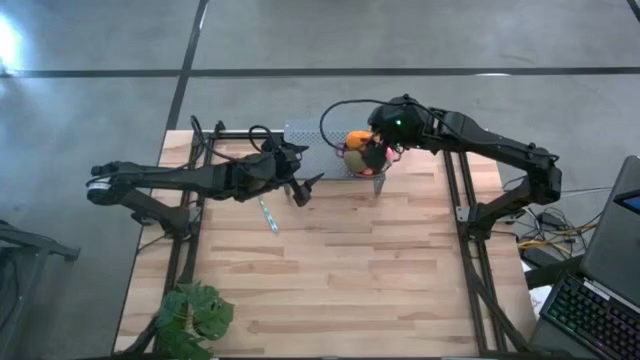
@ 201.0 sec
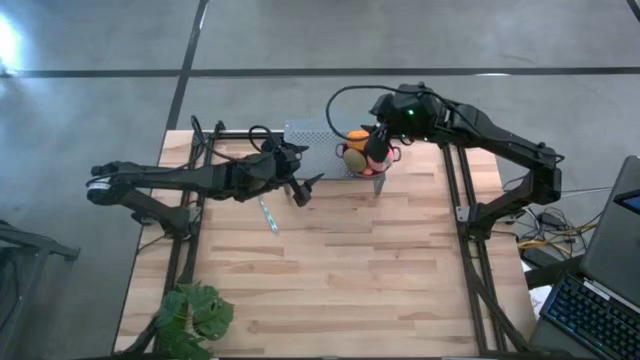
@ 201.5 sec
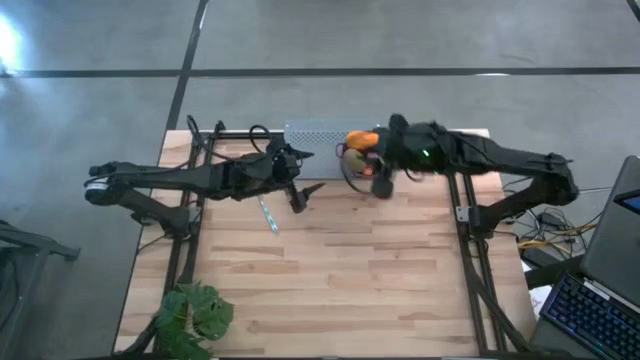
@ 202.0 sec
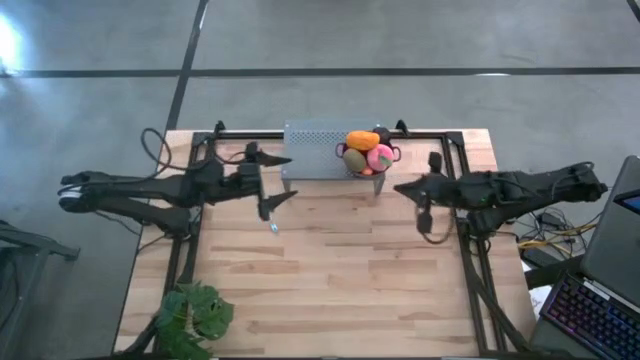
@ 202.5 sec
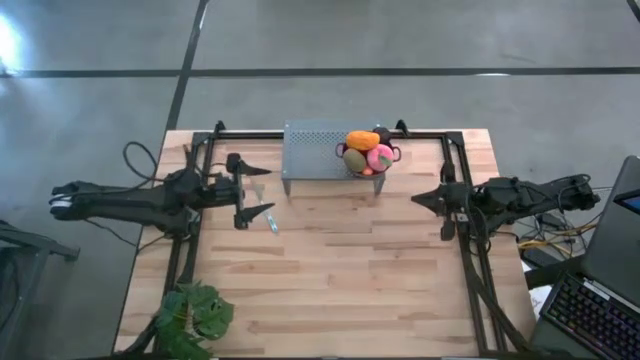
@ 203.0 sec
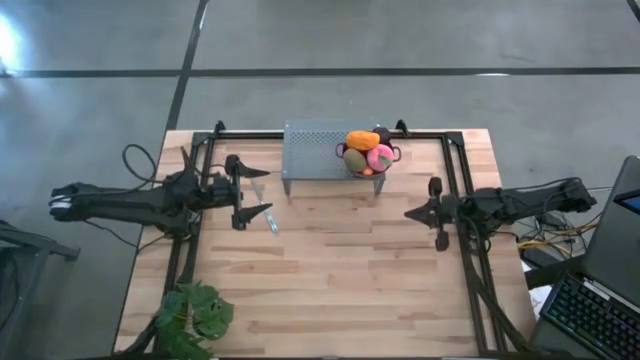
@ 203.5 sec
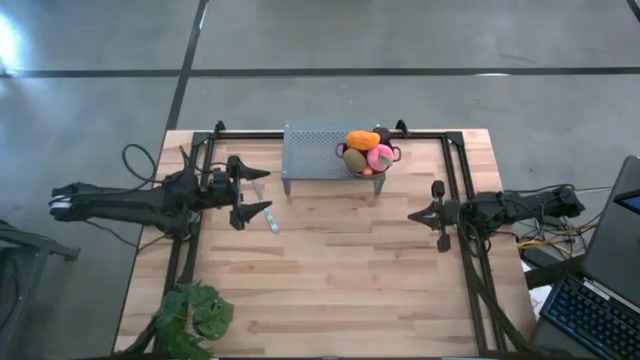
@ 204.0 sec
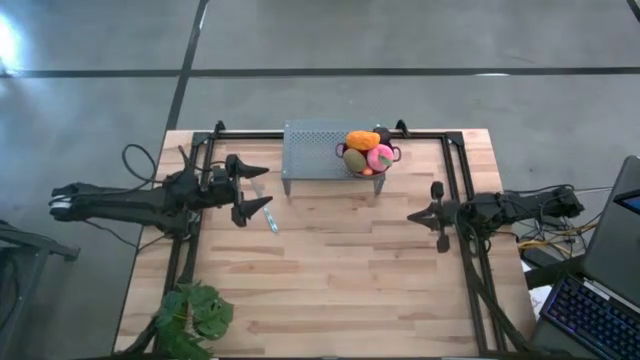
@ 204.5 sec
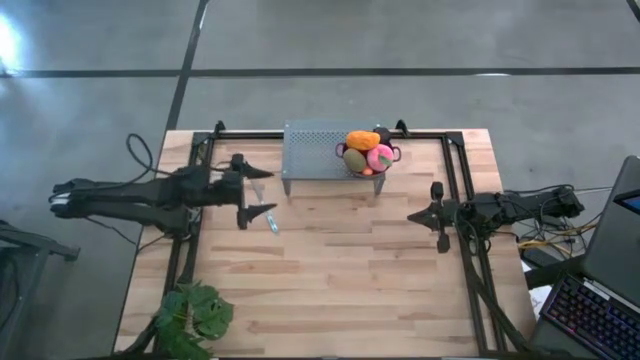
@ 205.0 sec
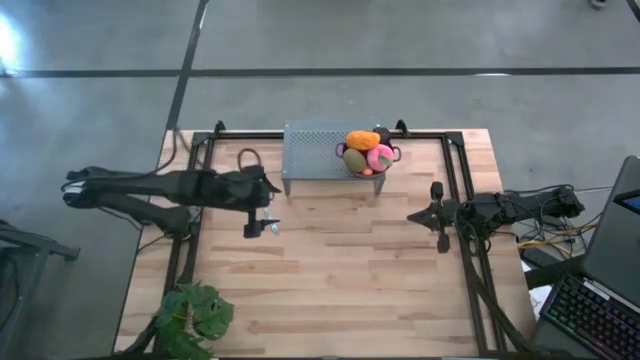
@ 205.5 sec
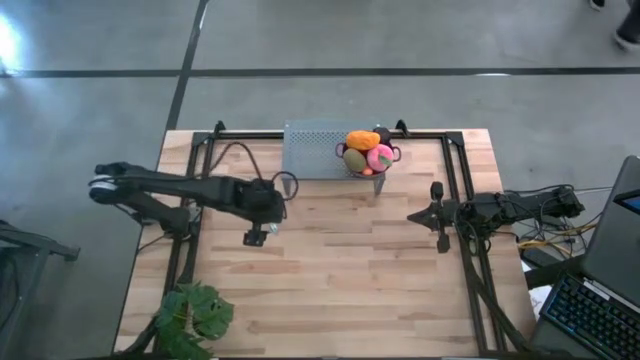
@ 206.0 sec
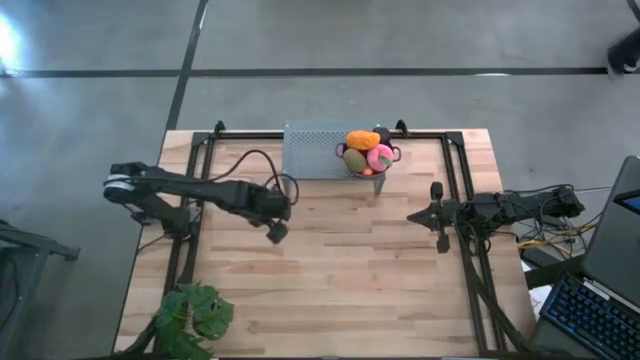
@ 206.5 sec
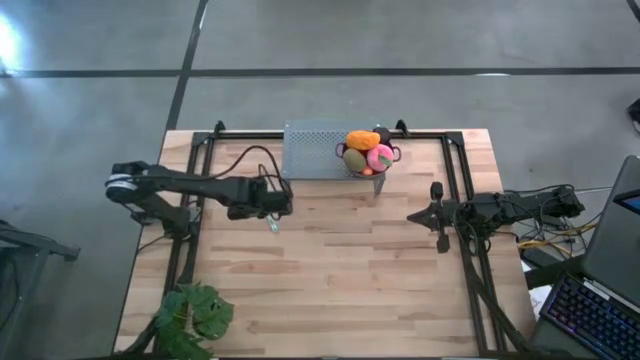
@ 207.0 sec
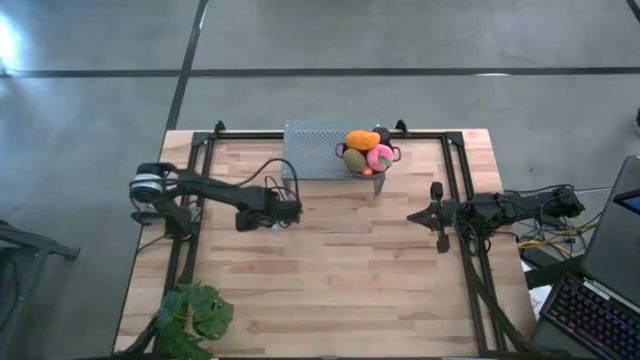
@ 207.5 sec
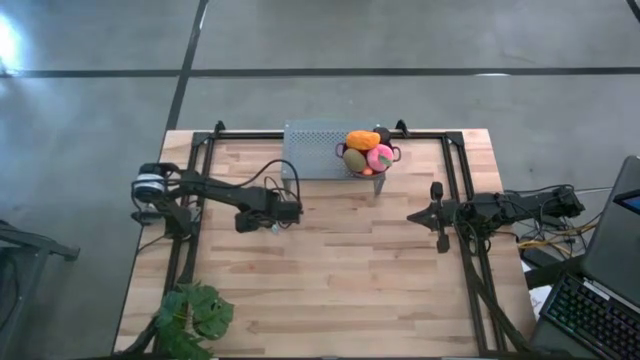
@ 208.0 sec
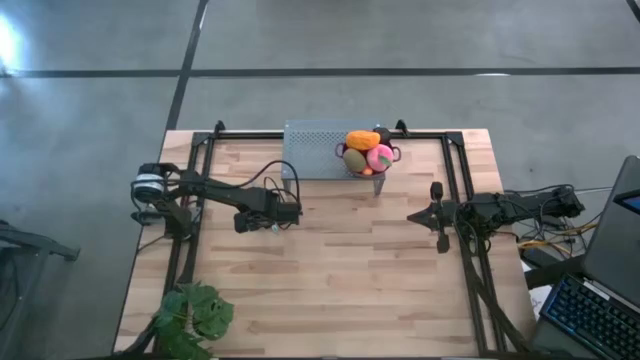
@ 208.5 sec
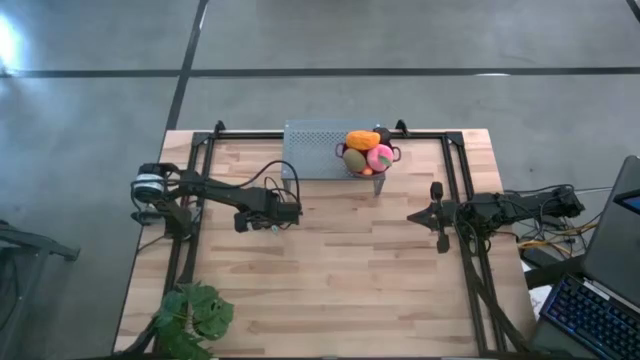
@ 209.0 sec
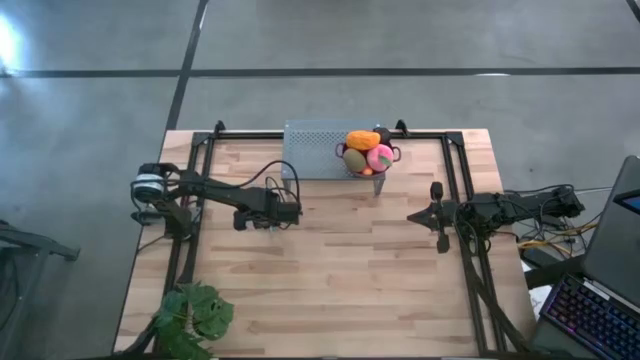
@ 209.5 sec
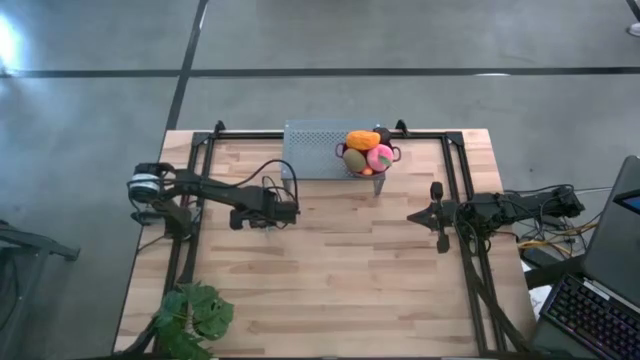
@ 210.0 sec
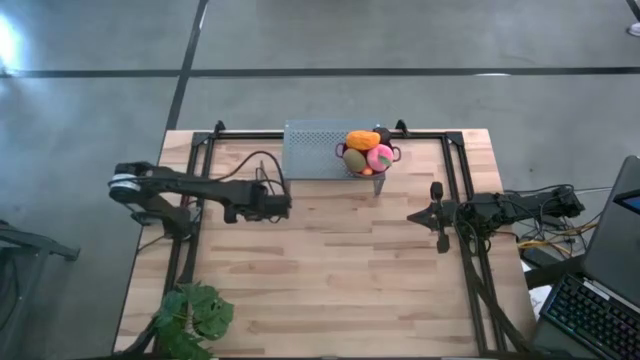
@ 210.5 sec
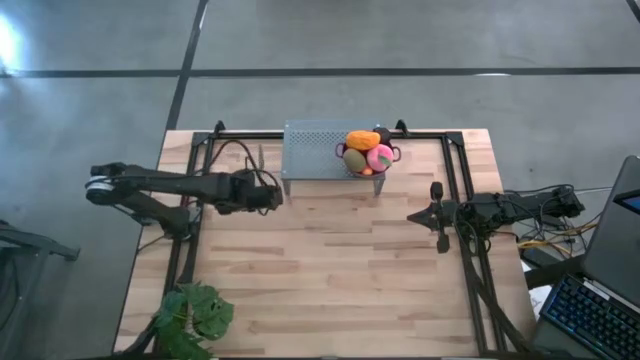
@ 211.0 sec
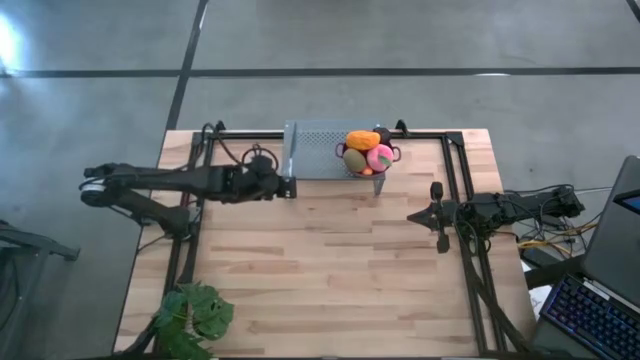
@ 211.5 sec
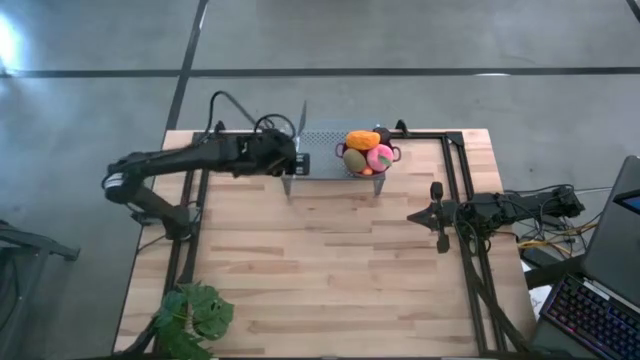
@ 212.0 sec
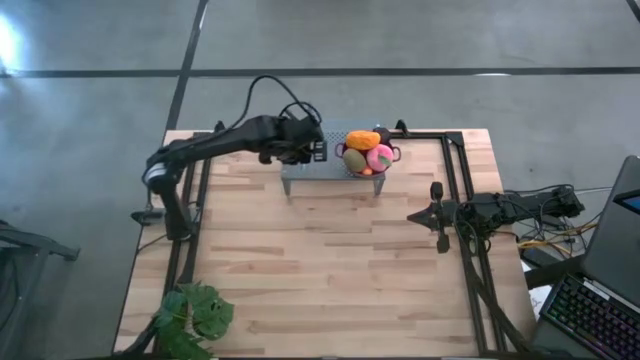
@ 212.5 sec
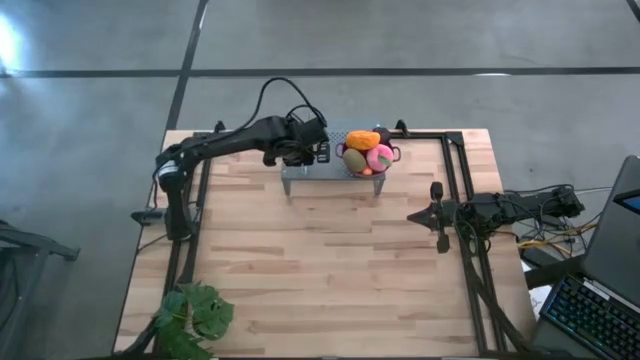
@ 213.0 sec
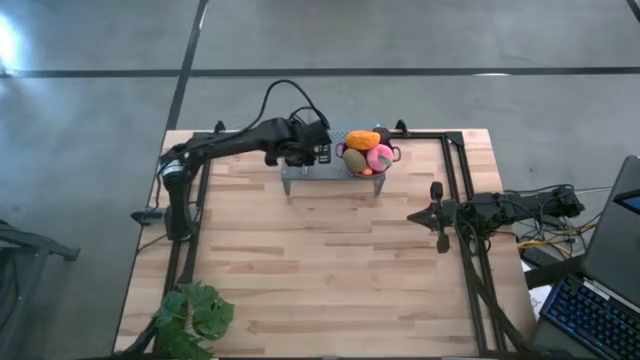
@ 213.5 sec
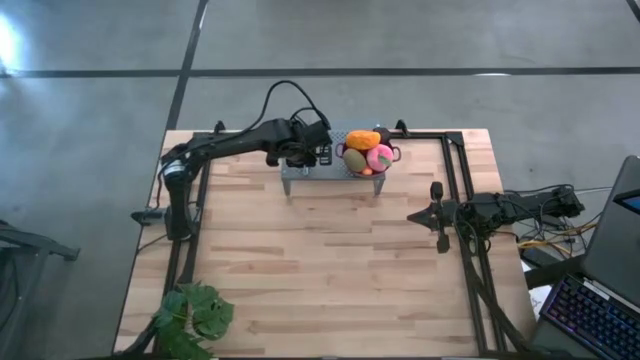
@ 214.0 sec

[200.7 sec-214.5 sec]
Task: Pick & Place Fruit
Put the knife on the shelf

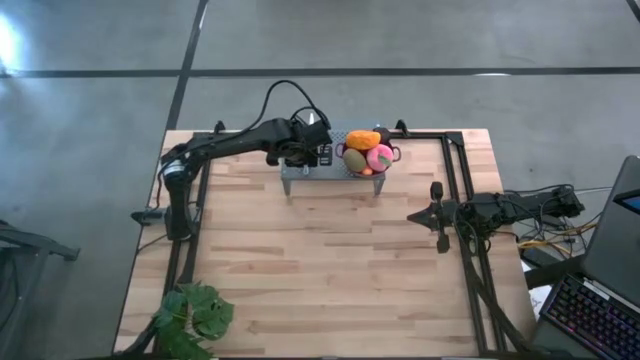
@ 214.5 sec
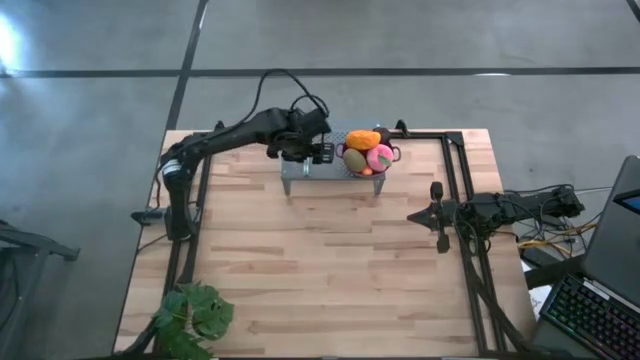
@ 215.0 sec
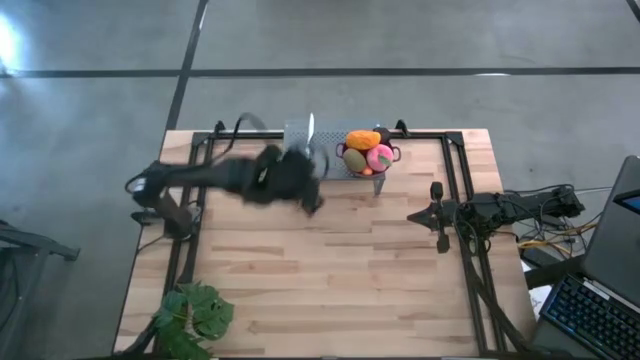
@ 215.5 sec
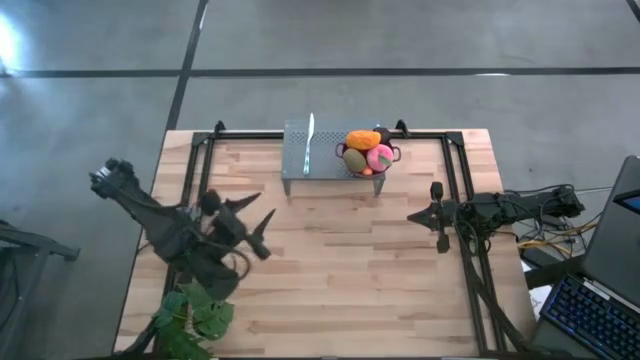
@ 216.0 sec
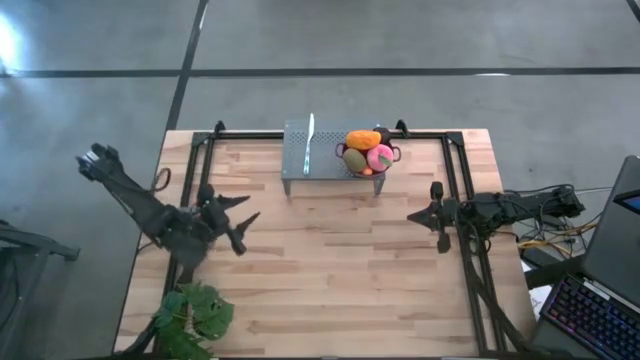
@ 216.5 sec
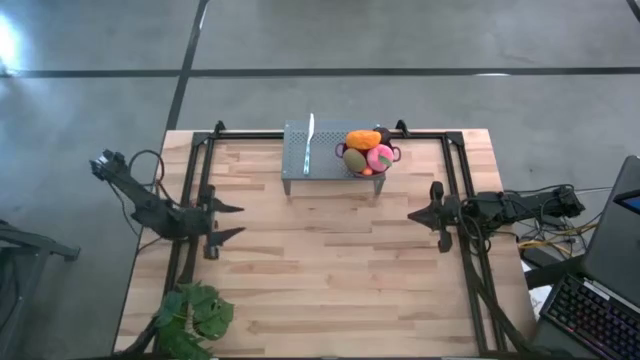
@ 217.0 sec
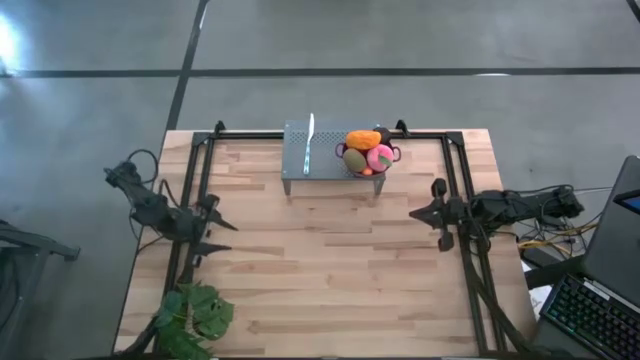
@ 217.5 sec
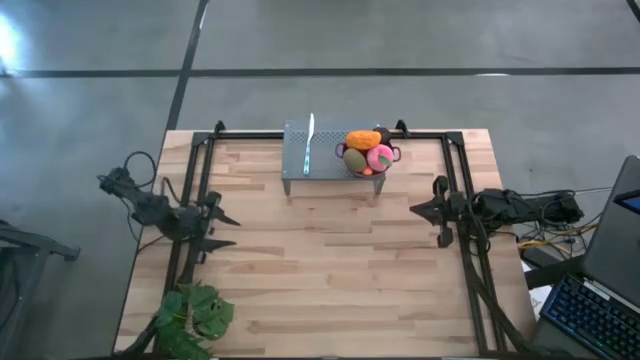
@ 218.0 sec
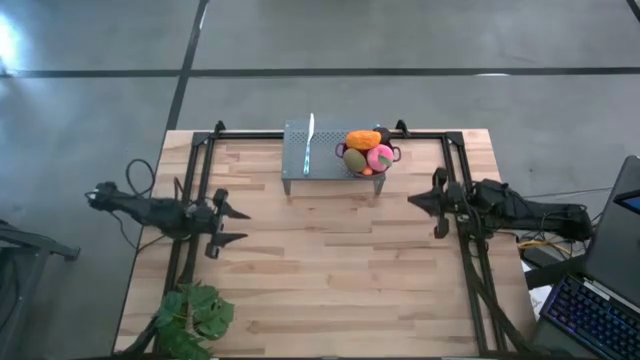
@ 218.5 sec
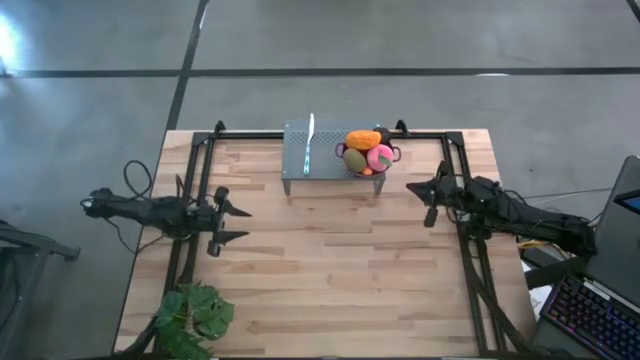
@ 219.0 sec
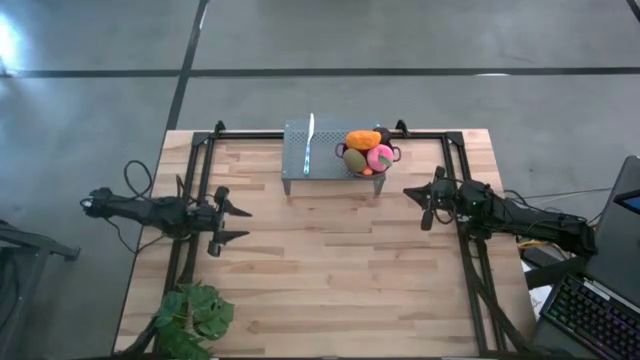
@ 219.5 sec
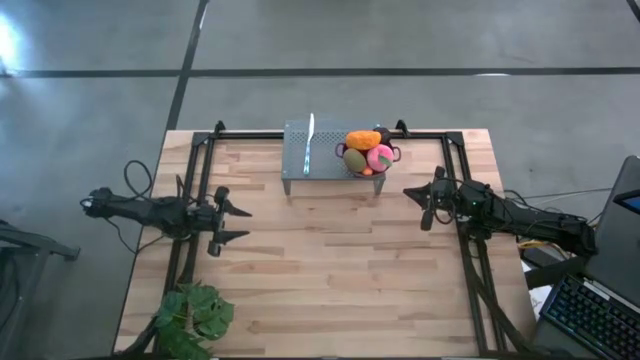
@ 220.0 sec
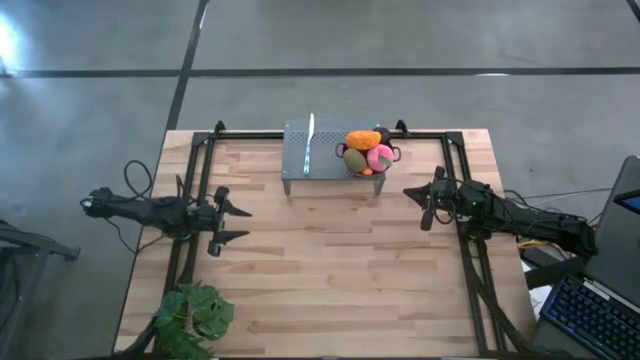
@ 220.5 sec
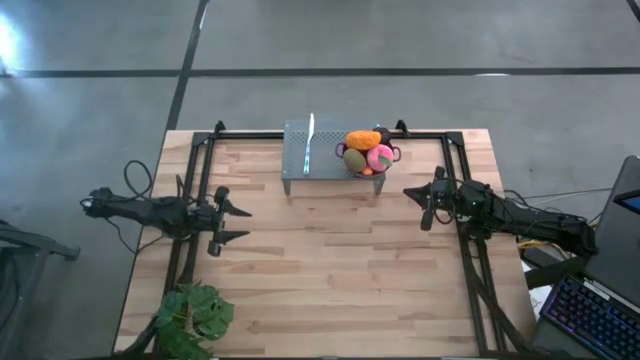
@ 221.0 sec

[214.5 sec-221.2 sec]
Return to Home Position

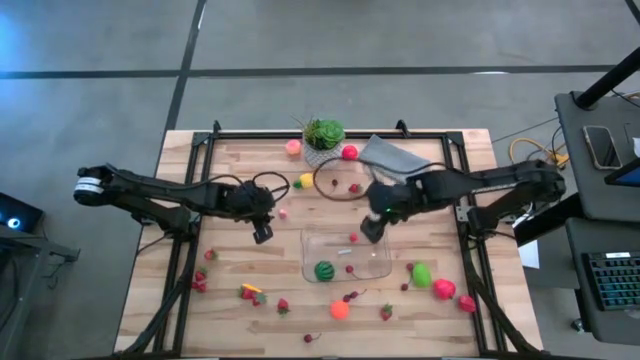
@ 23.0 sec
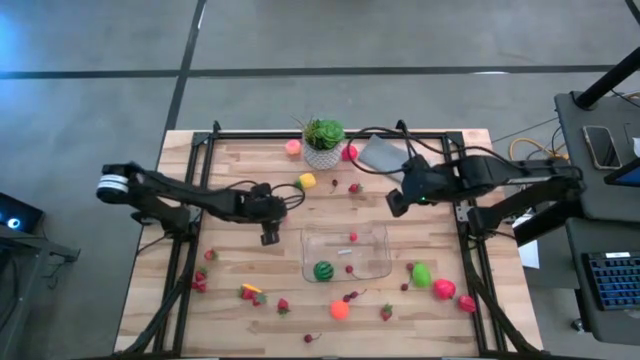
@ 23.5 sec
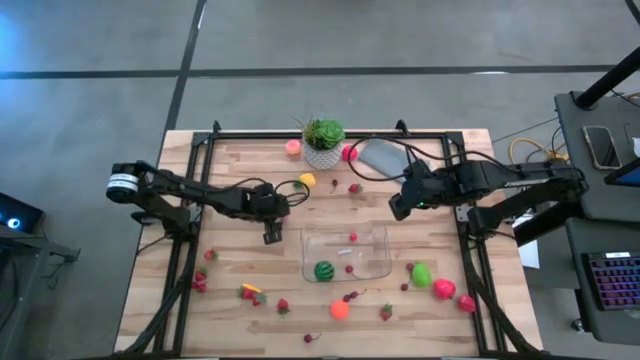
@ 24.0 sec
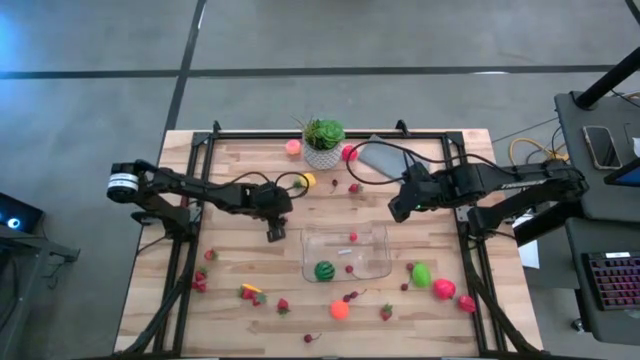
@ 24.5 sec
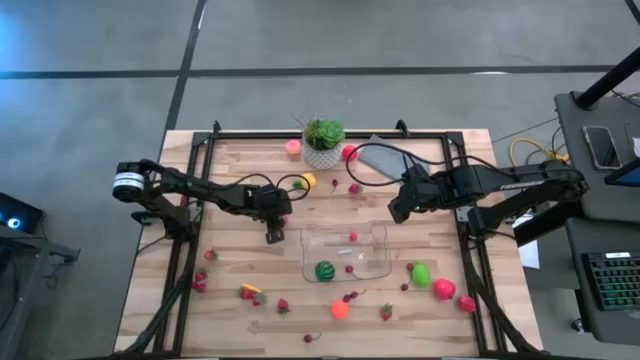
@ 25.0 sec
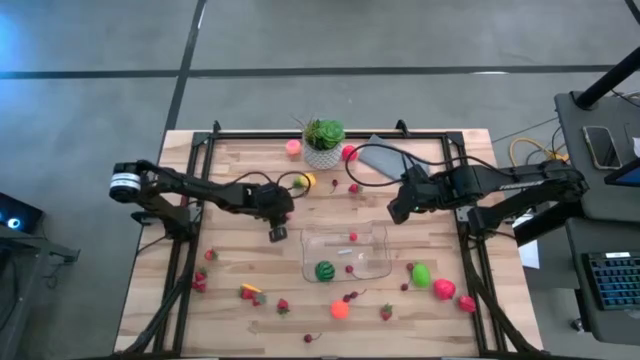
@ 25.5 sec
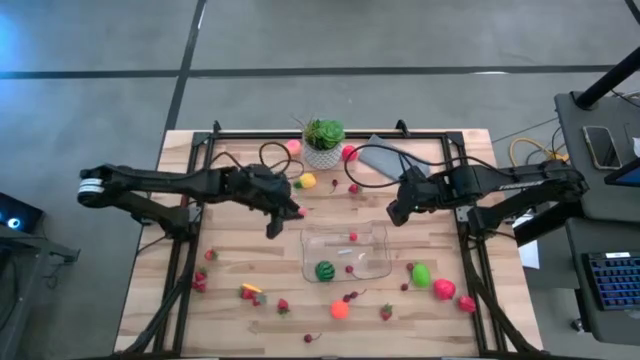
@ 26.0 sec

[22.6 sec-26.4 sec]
Task: Pick and placing Produce into tupperware
Put the peach into the transparent bin
